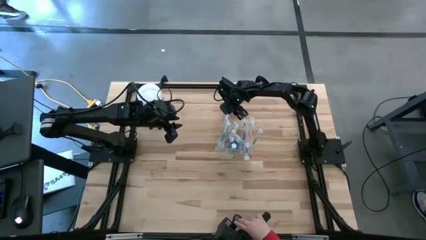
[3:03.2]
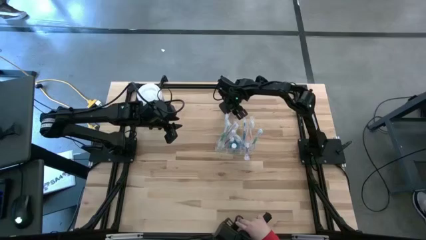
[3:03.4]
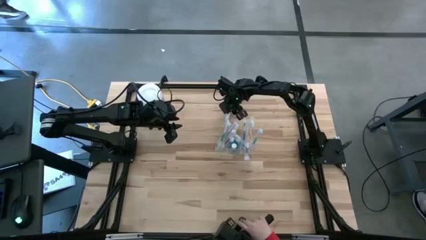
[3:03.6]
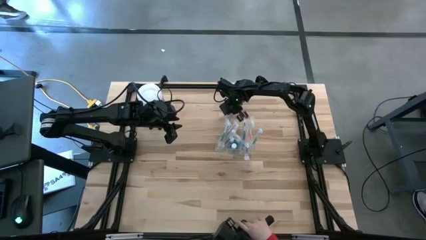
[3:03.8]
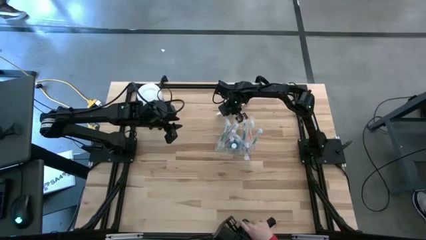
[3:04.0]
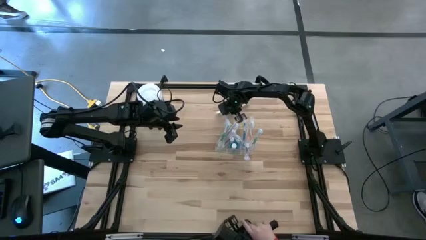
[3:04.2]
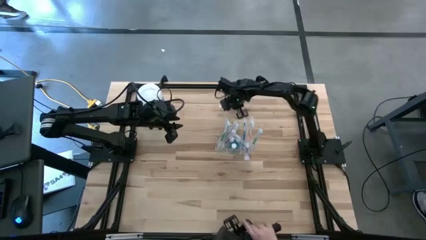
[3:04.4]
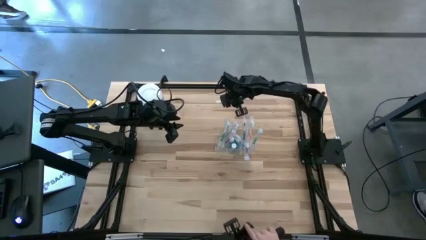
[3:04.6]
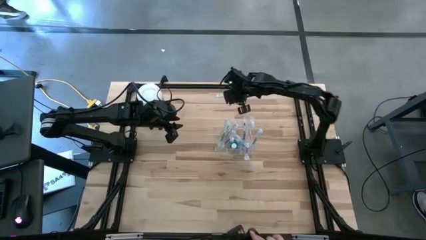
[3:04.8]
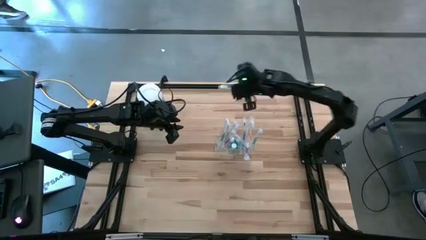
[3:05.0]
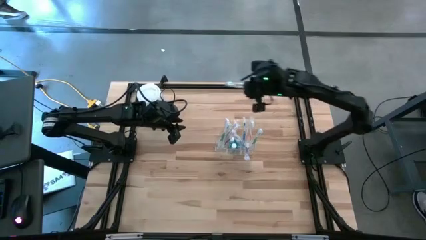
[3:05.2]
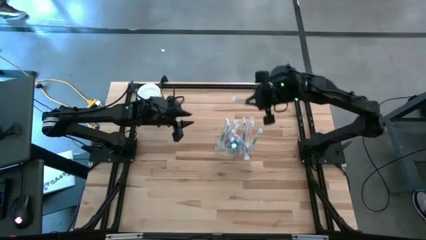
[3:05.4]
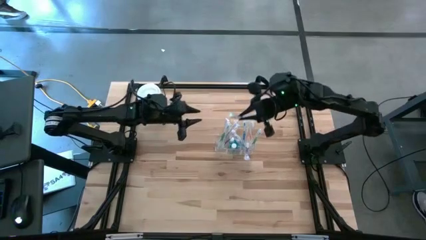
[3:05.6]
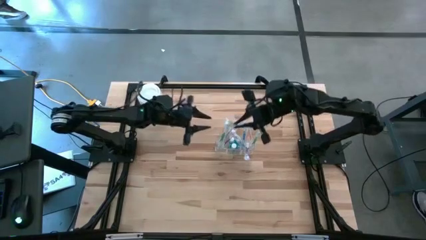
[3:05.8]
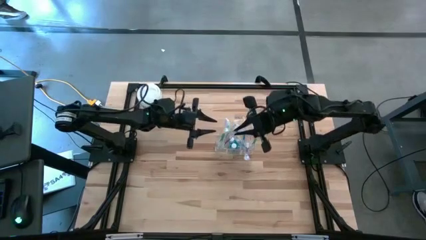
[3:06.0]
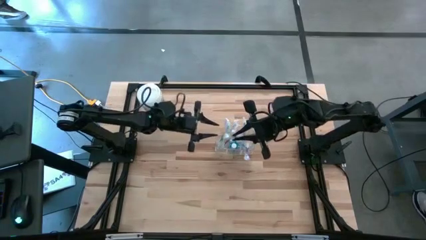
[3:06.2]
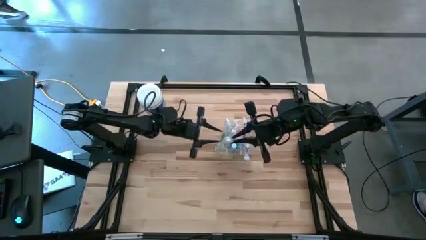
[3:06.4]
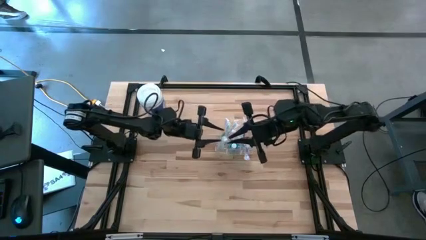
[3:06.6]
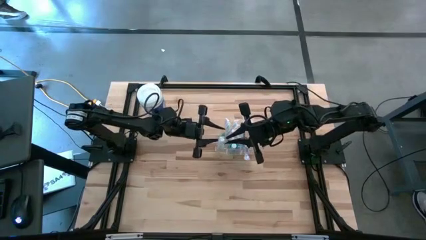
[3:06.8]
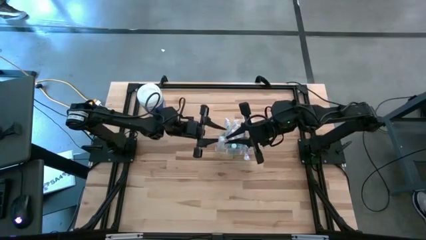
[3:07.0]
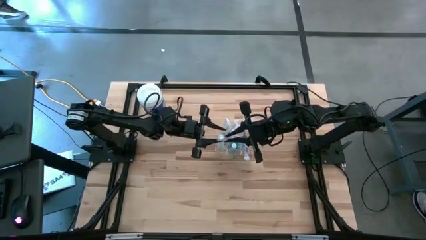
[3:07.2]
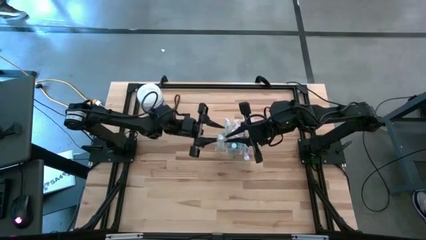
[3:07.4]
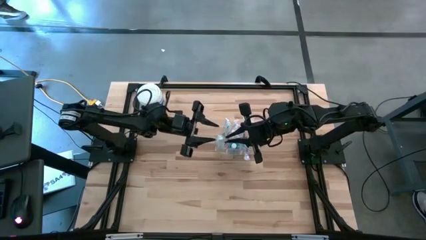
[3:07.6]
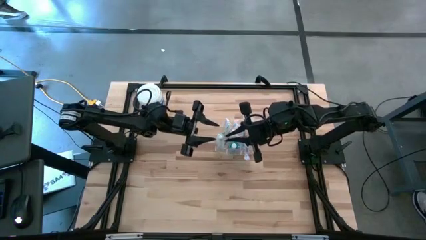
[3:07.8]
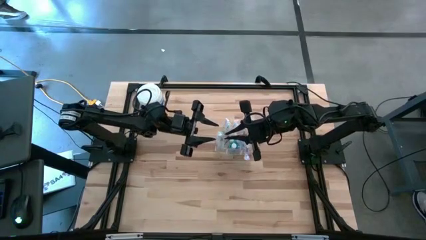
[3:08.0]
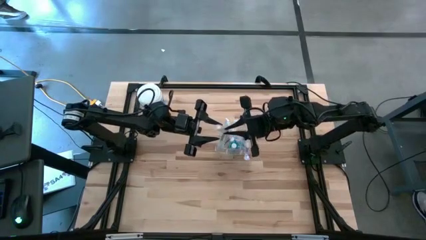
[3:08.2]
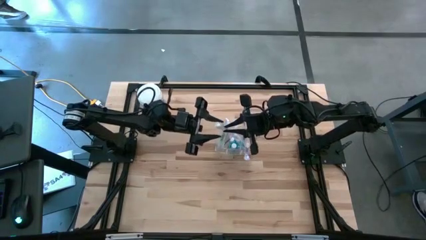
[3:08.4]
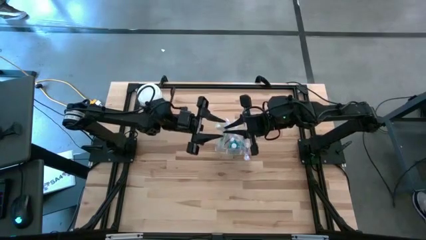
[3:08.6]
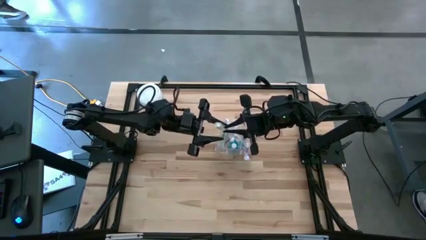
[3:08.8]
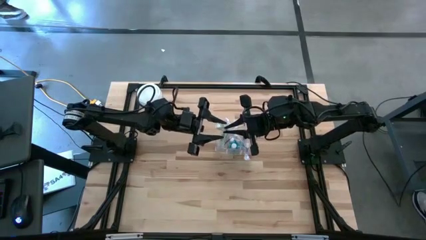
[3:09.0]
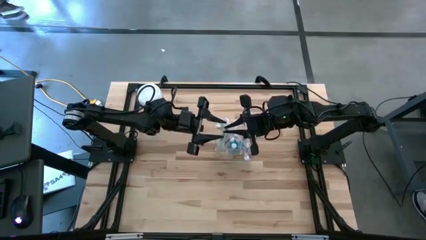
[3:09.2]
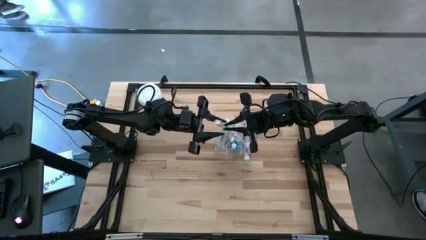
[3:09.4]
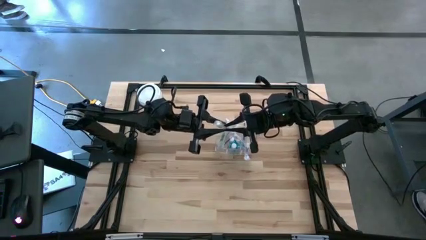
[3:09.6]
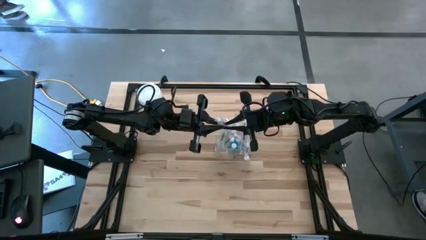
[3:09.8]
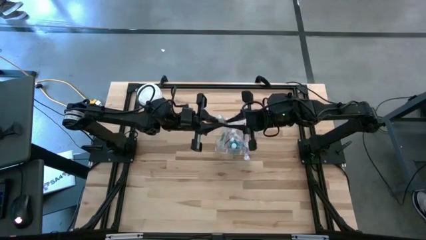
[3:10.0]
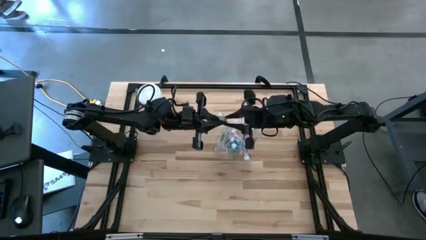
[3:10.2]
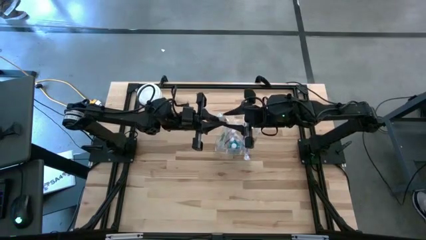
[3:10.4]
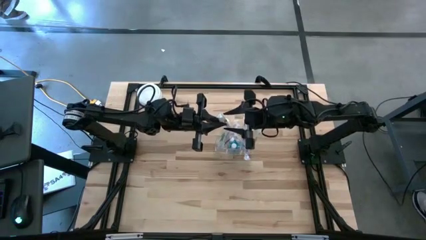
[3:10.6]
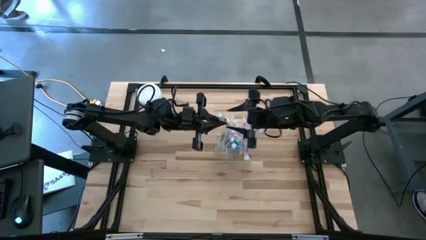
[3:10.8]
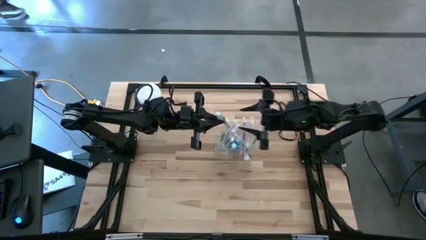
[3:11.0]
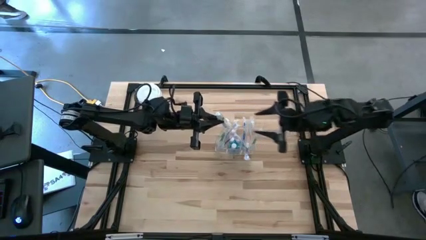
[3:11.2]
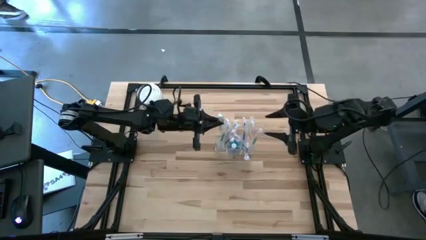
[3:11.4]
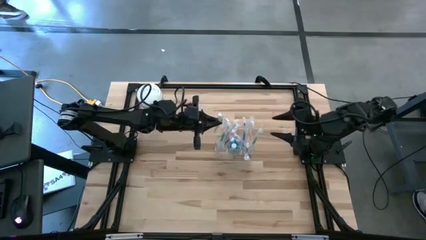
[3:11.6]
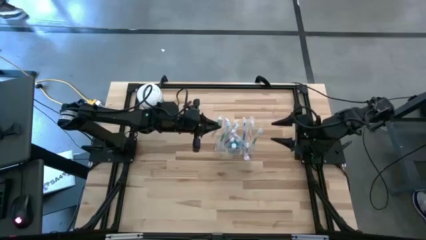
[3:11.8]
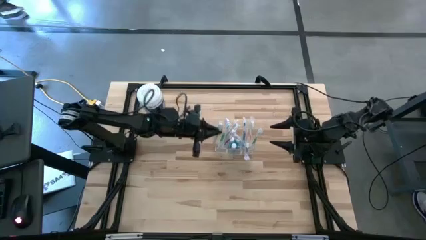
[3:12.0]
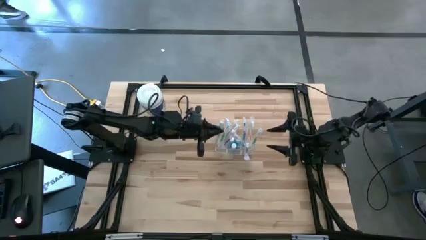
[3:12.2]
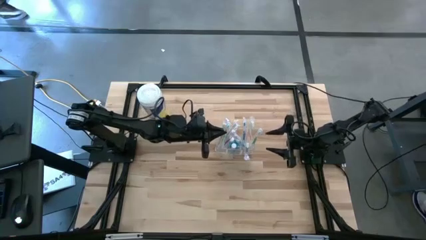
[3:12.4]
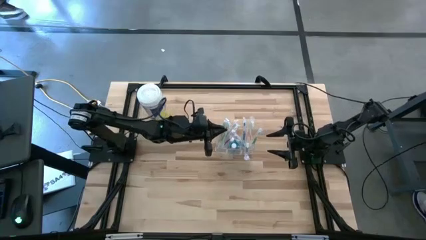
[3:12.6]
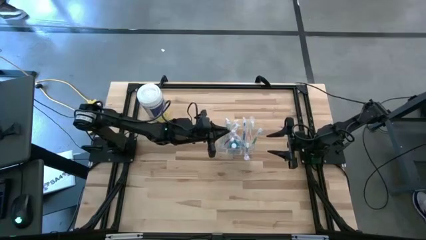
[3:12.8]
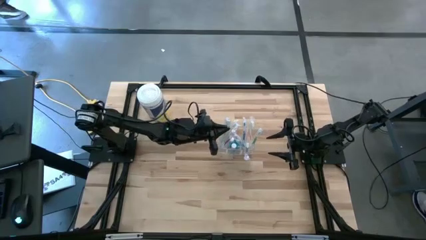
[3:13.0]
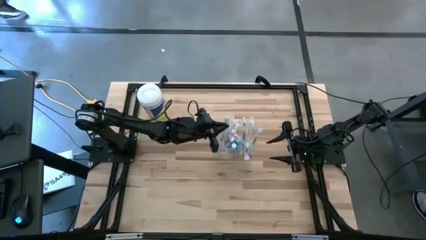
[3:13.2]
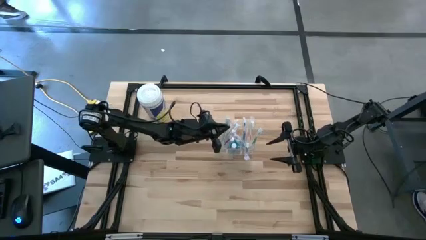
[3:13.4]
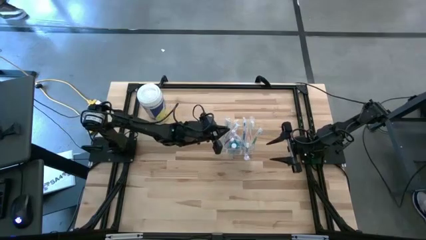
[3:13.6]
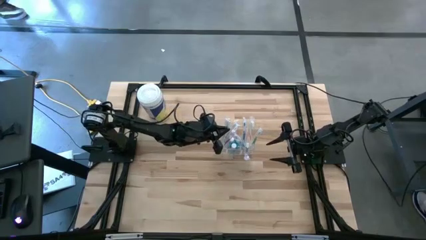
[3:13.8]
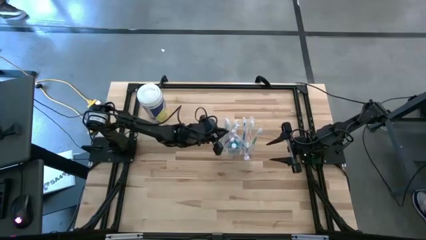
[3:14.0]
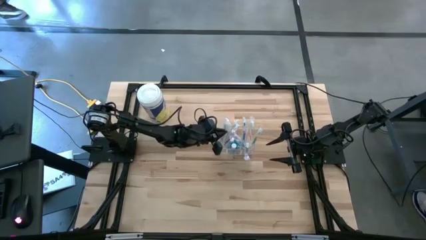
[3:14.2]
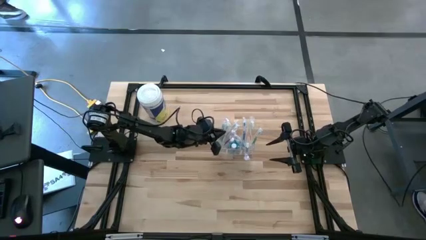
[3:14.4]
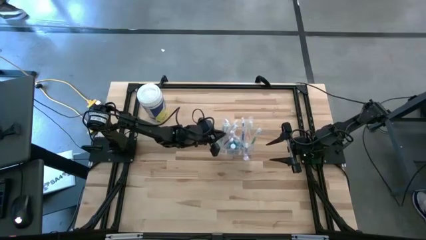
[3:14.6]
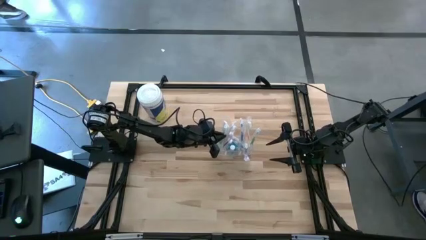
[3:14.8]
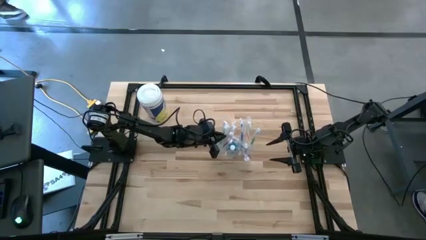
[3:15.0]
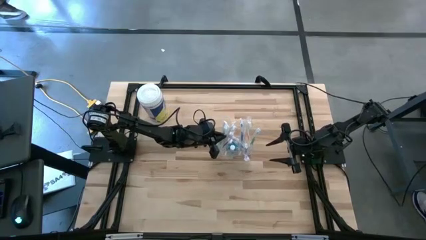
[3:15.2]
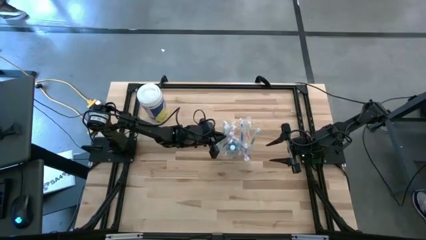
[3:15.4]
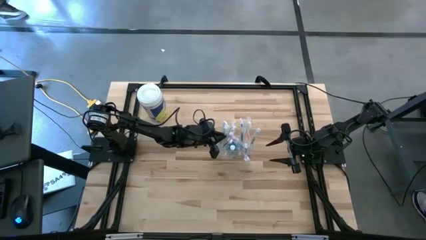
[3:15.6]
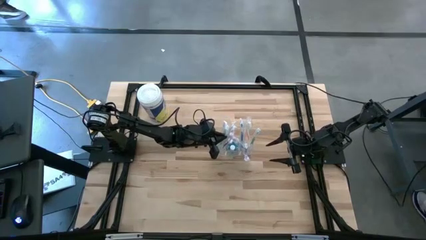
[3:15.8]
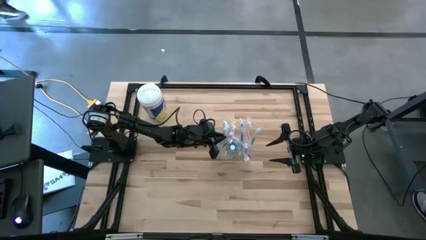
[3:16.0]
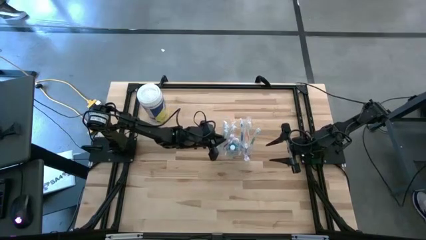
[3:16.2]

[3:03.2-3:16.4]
Task: Pick & Place toothbrushing station
Put the green toothbrush into the left section of the transparent organizer
